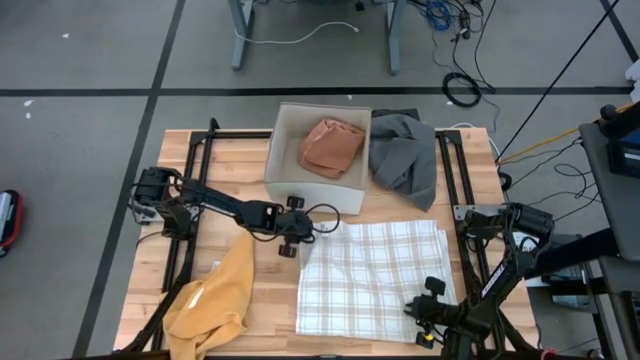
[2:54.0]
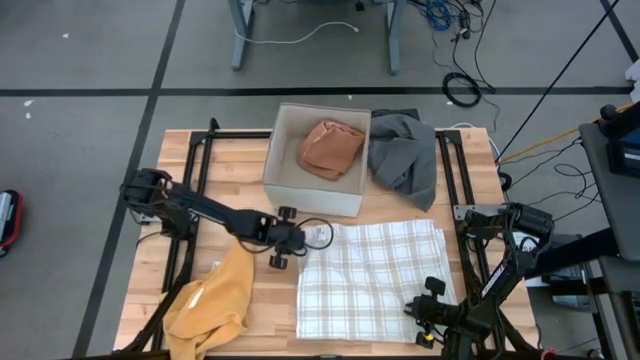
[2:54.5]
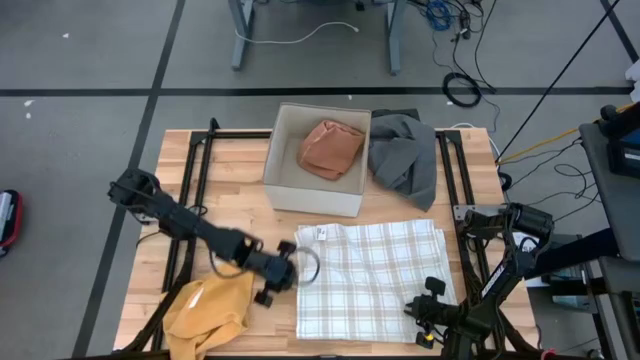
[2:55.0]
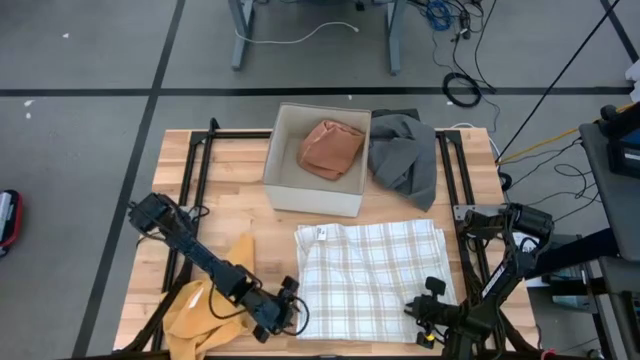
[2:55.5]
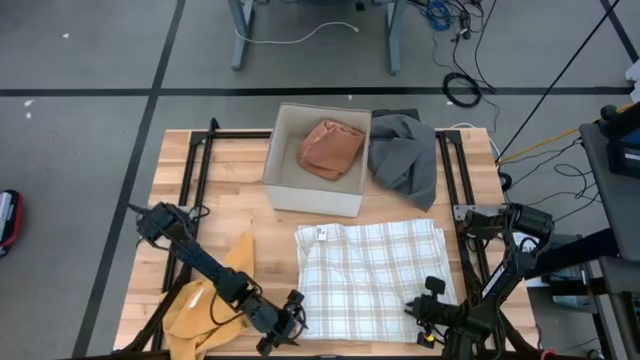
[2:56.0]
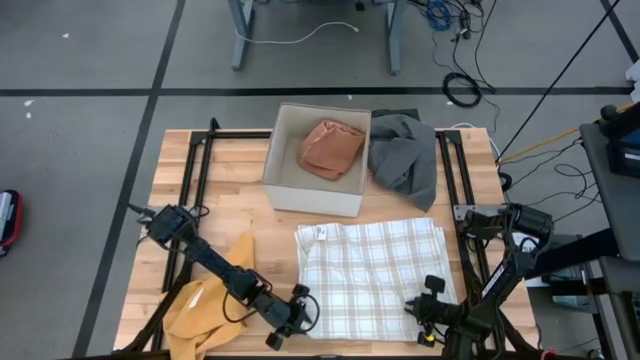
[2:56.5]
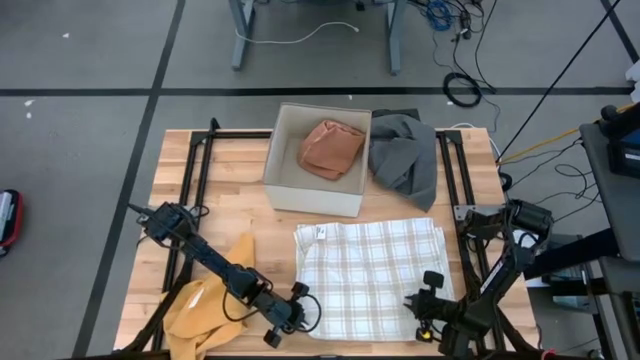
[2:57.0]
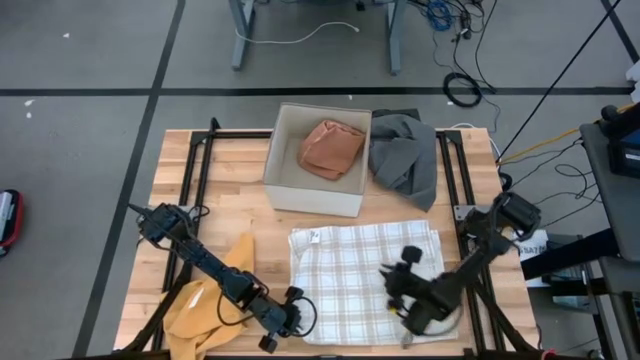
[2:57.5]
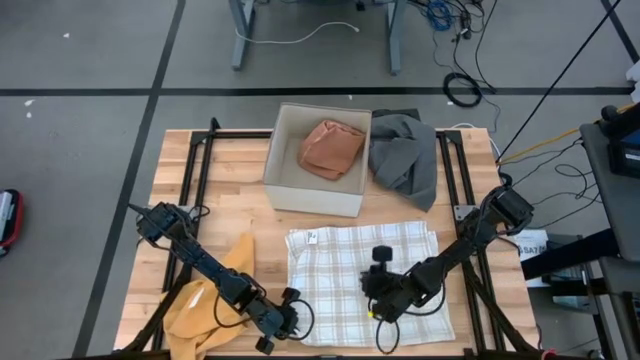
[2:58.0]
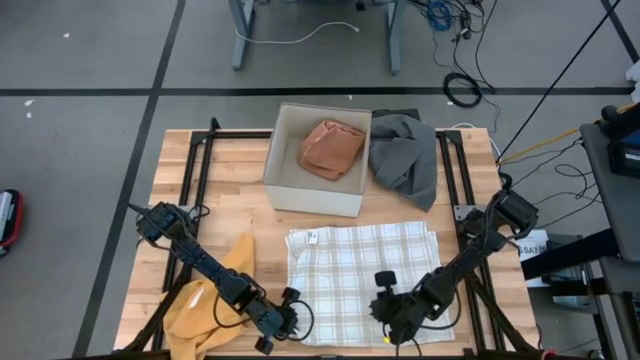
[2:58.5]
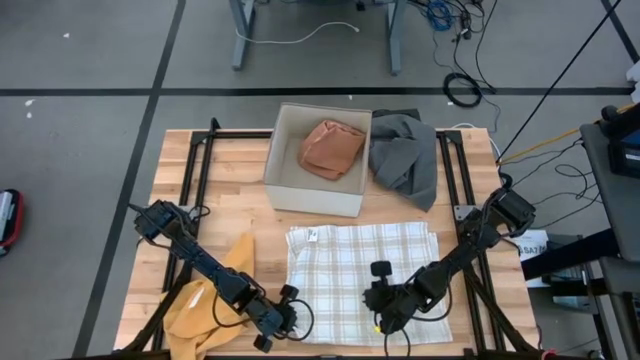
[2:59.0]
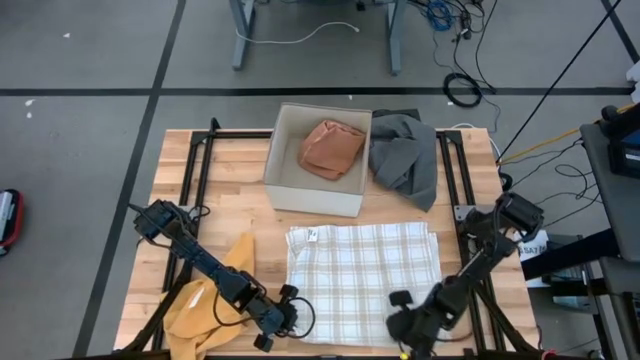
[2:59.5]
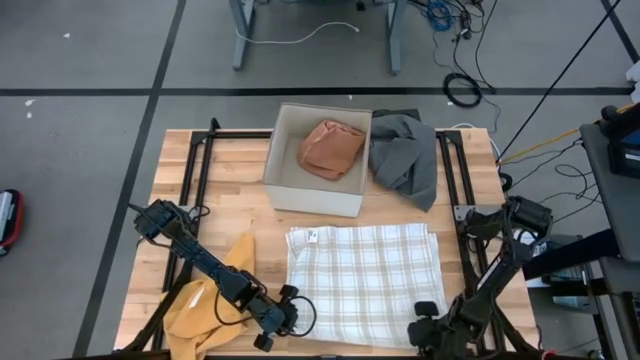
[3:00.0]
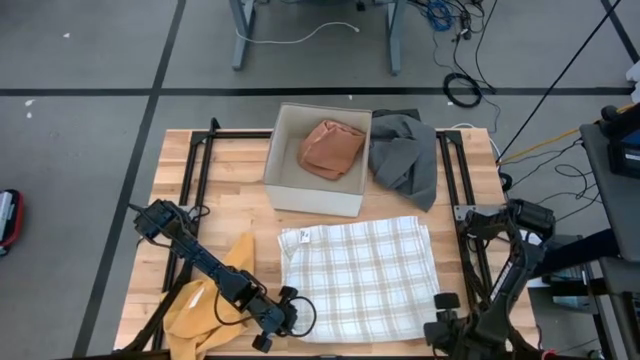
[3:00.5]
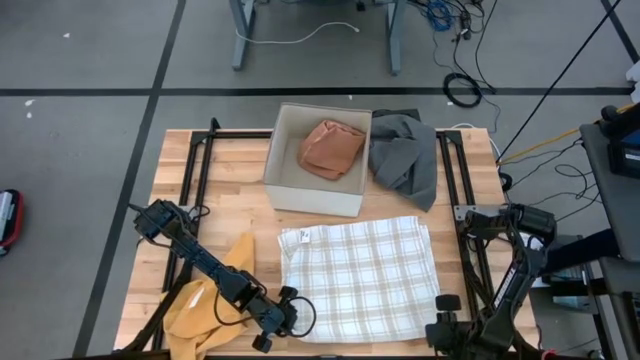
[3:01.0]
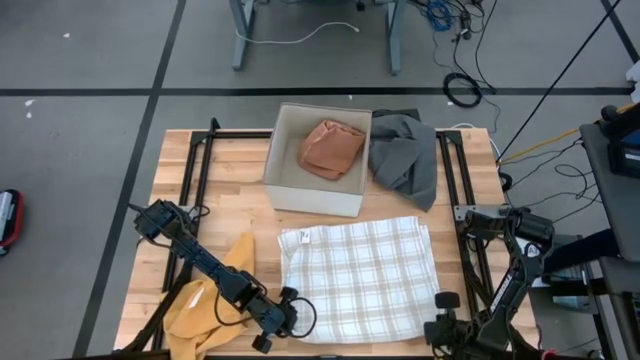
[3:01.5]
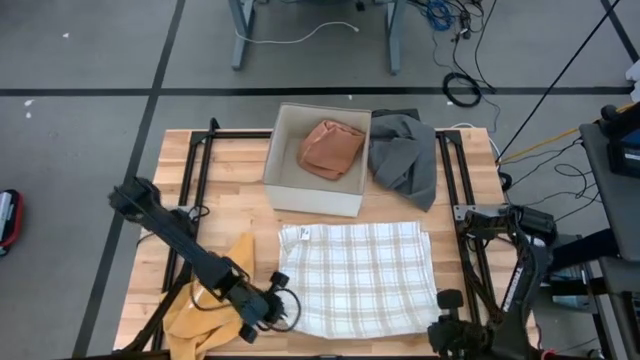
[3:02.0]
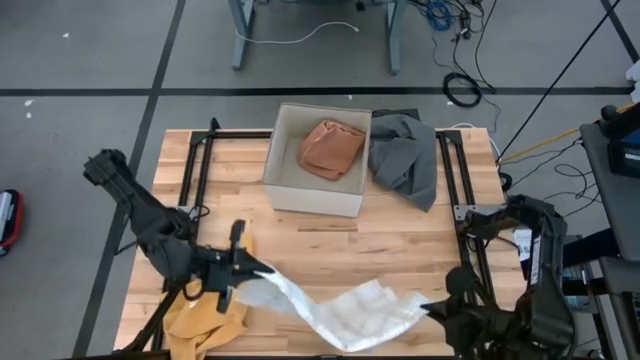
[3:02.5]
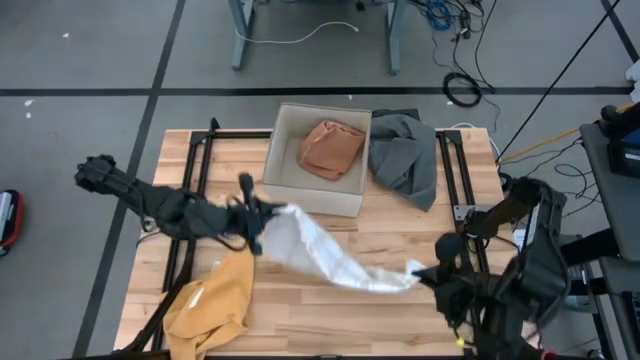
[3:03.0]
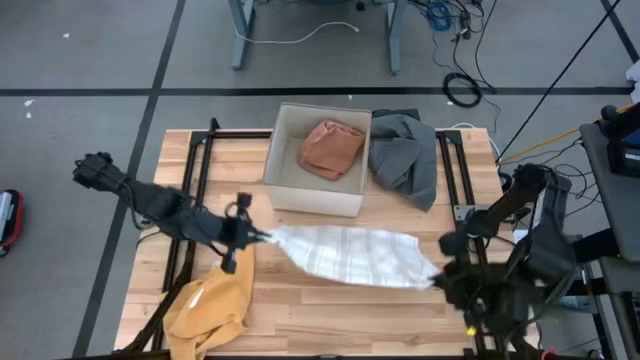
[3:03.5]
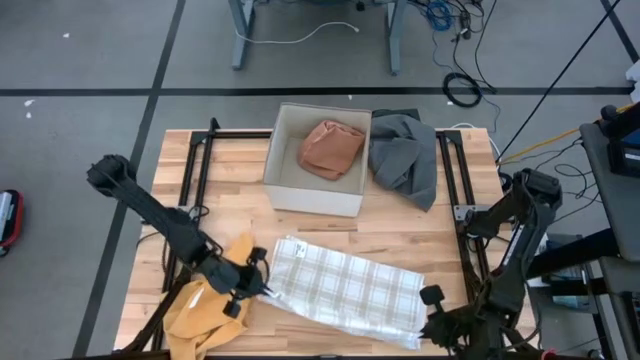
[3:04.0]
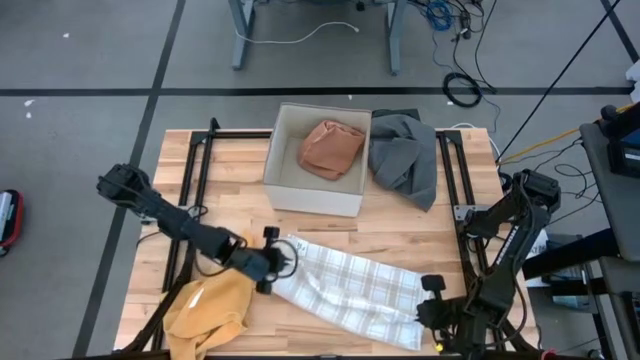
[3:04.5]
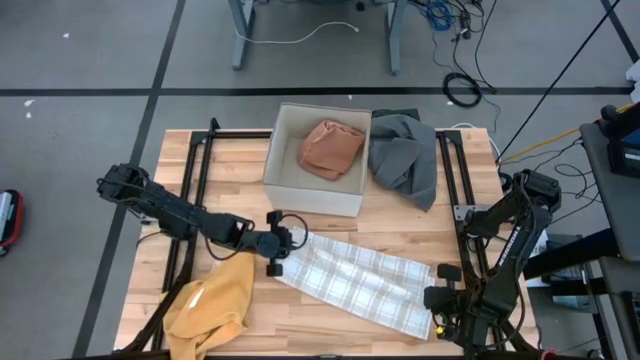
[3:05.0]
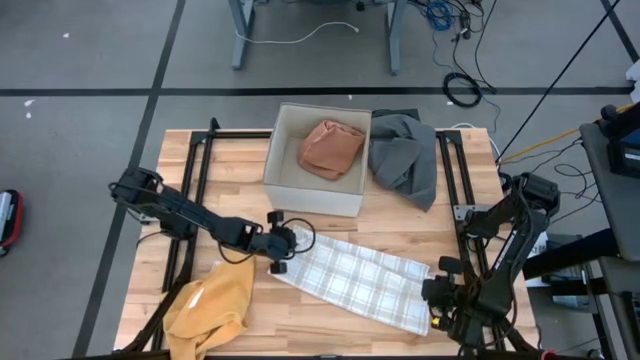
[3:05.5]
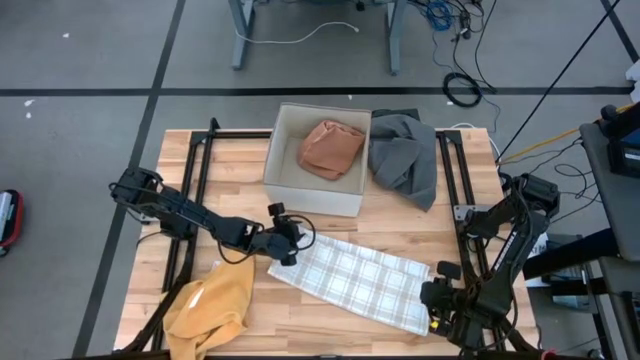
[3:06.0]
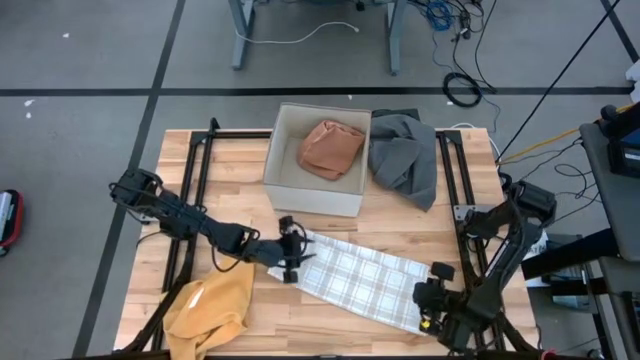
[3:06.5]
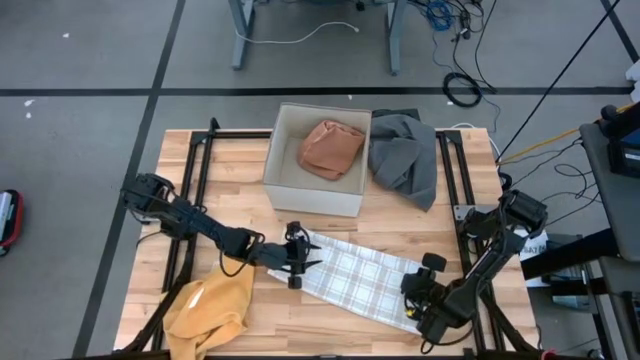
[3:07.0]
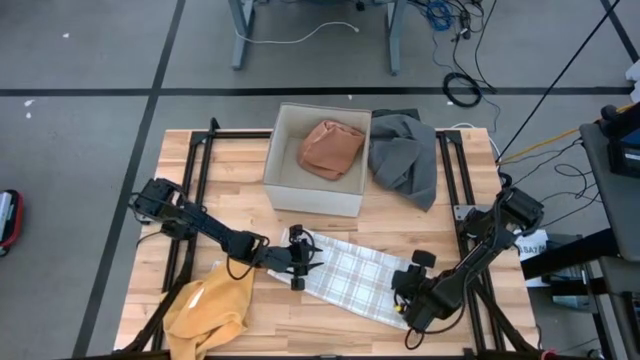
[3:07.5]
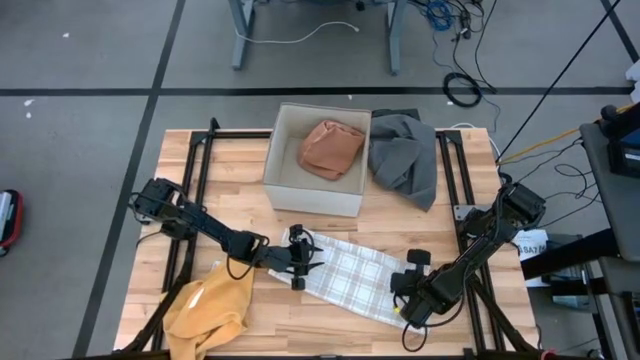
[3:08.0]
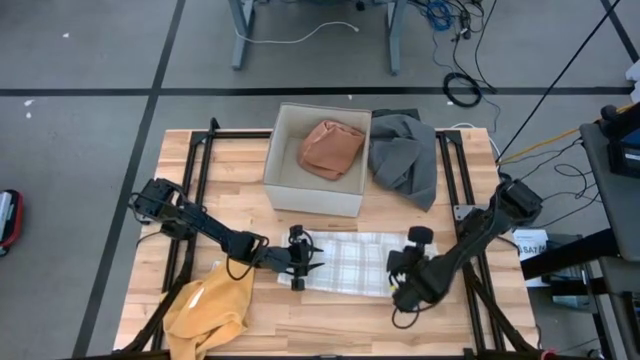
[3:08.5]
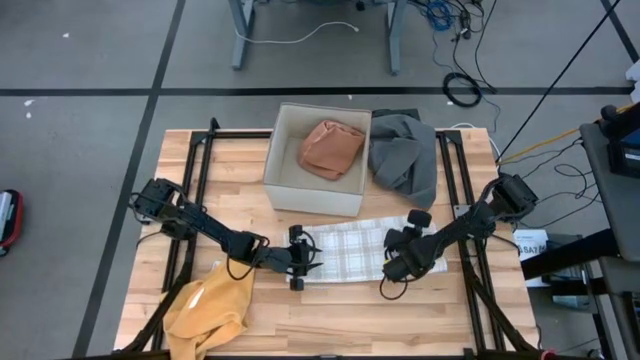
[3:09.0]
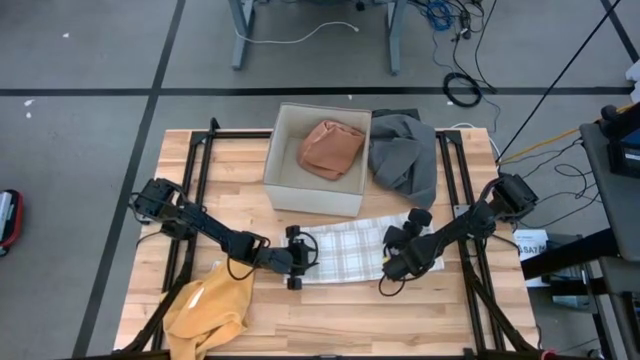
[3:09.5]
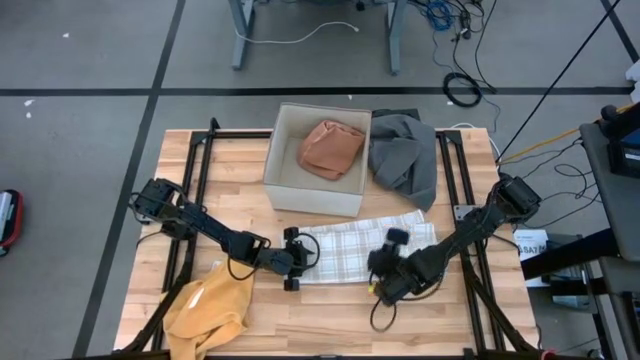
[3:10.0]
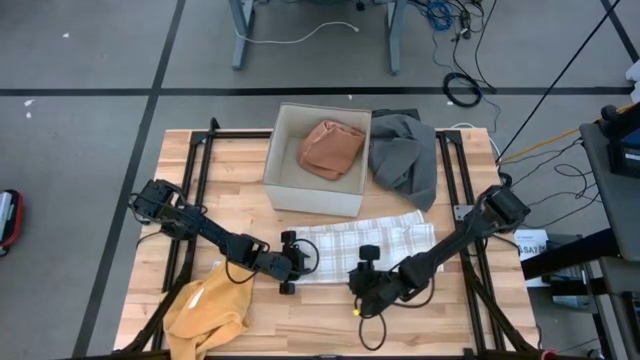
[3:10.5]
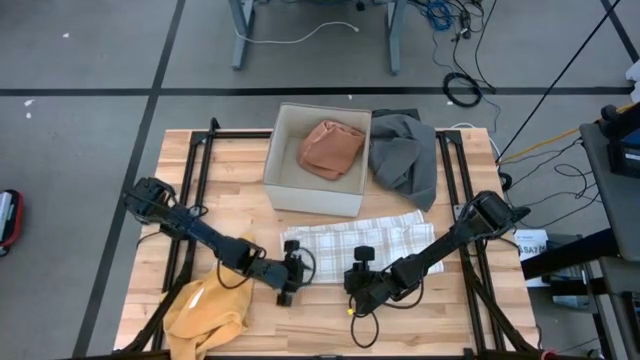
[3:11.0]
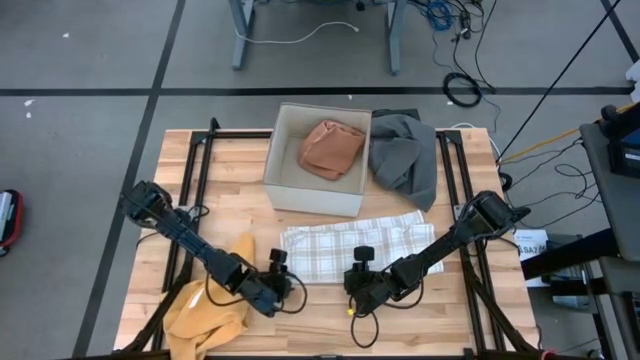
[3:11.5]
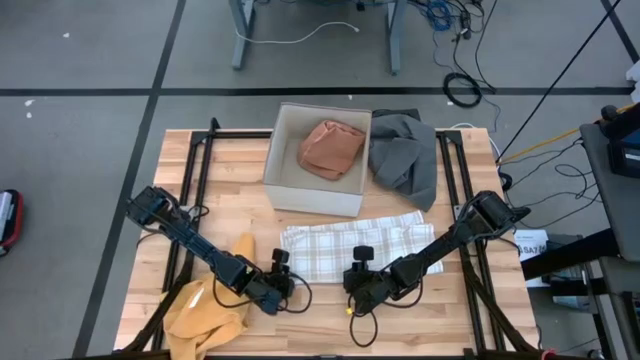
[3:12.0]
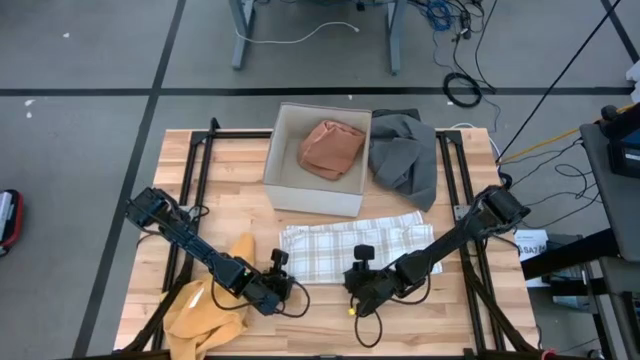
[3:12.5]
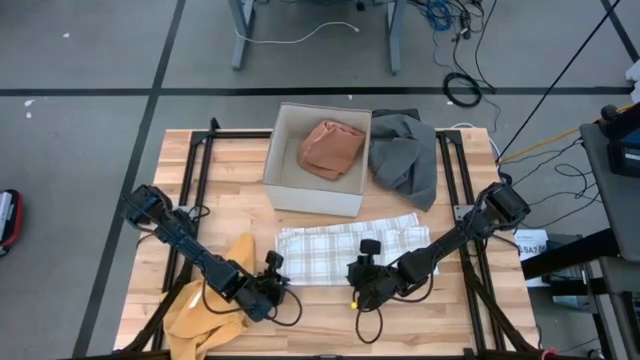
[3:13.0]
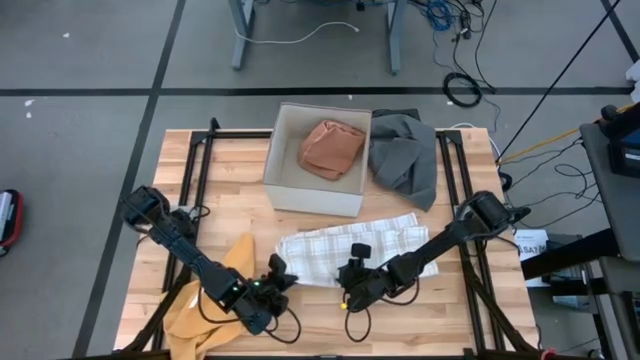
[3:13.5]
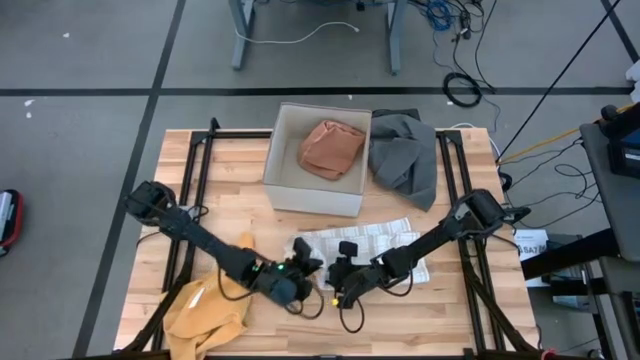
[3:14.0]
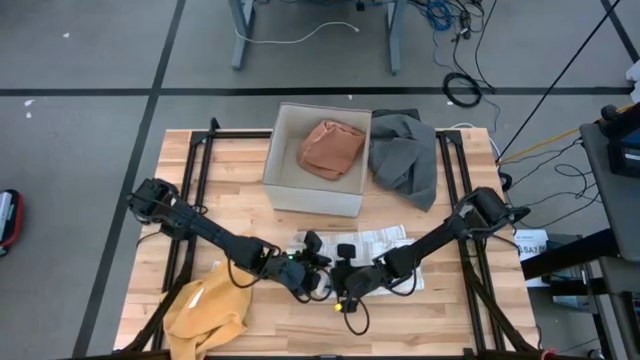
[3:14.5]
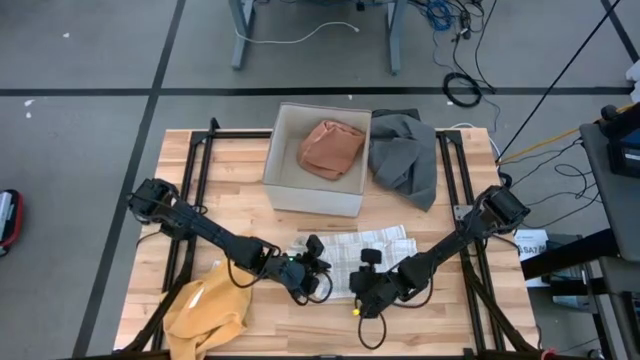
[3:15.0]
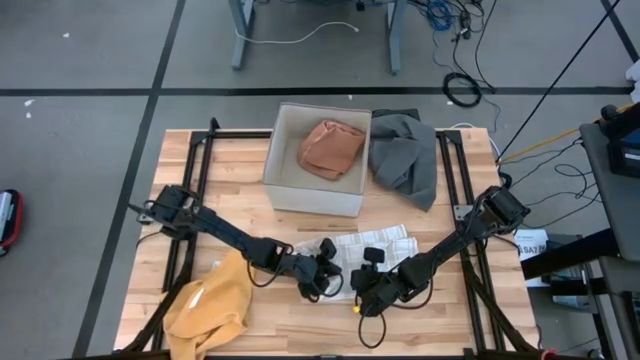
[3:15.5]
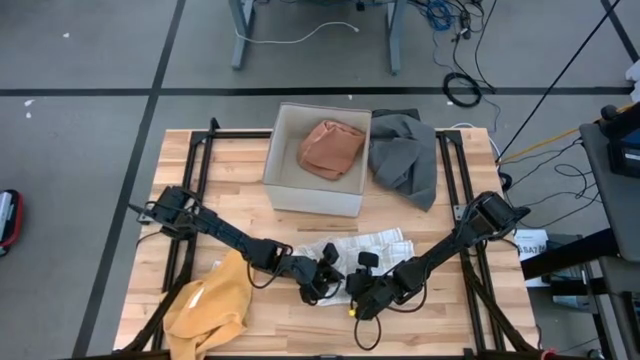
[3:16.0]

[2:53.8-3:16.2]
Task: Fold towel
Fold the white towel
